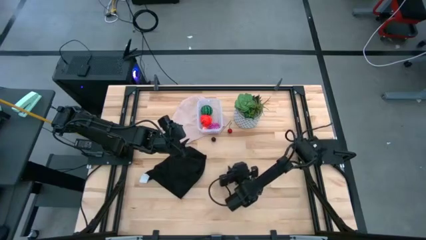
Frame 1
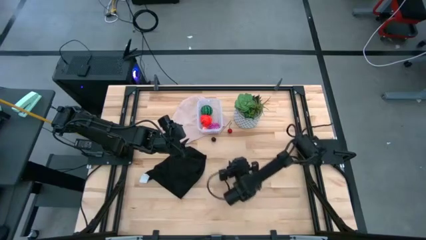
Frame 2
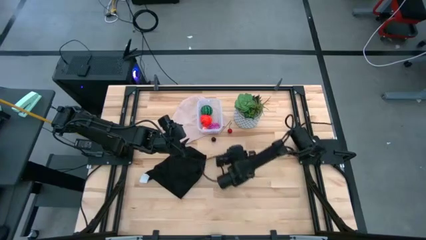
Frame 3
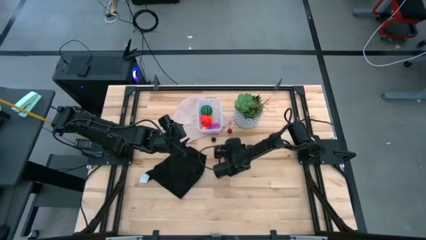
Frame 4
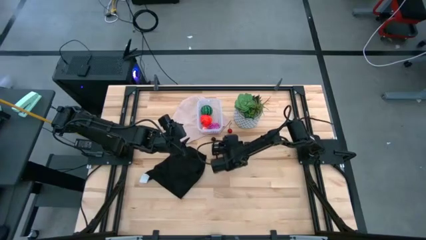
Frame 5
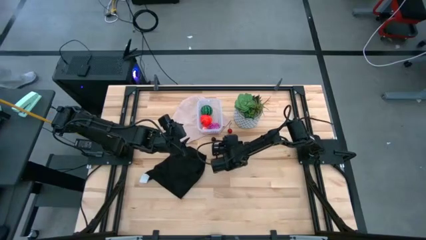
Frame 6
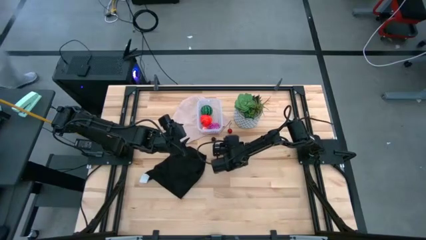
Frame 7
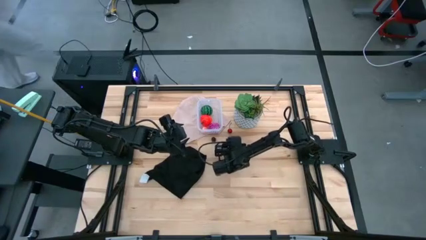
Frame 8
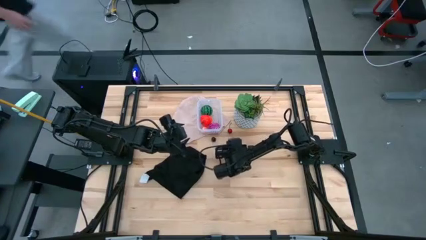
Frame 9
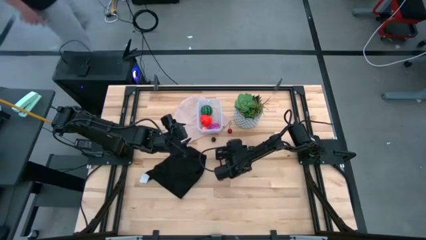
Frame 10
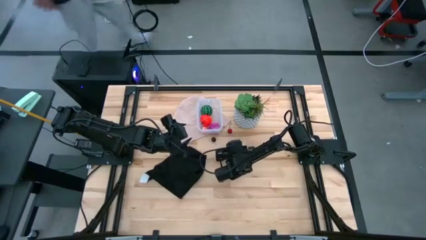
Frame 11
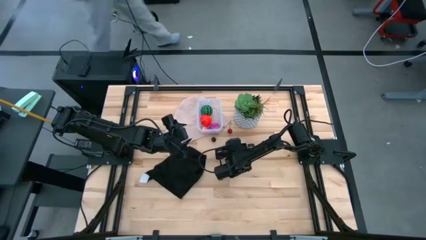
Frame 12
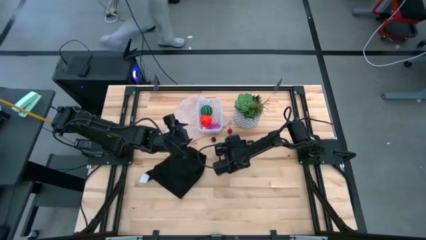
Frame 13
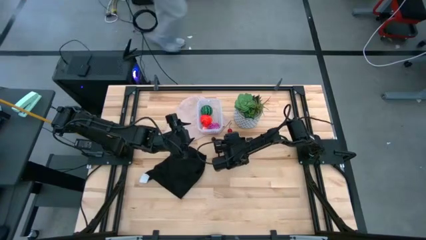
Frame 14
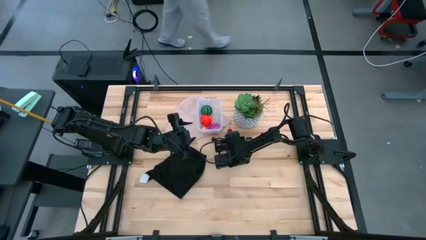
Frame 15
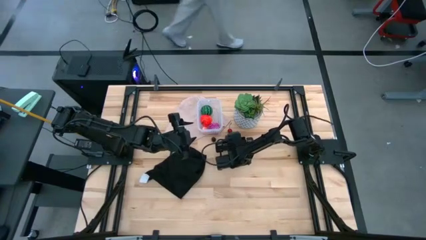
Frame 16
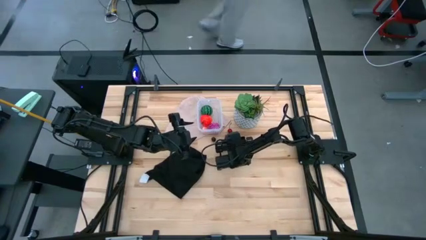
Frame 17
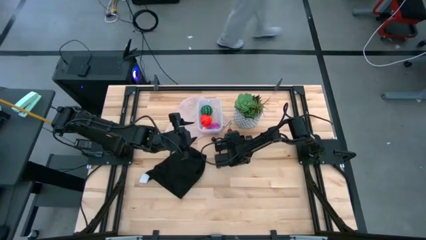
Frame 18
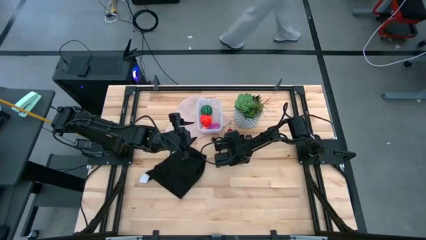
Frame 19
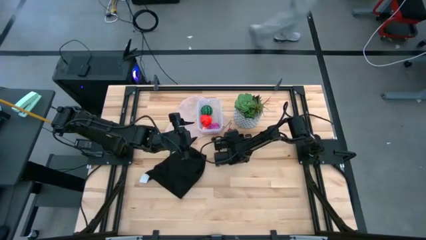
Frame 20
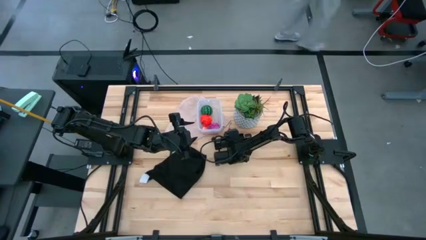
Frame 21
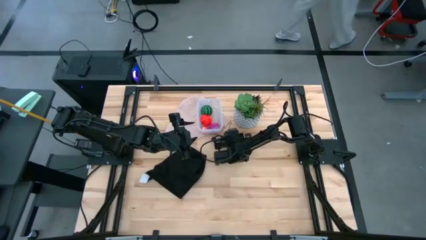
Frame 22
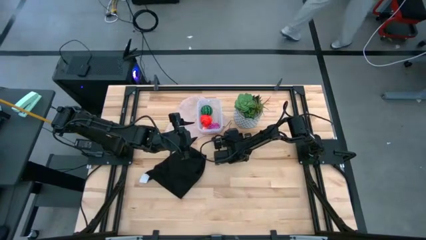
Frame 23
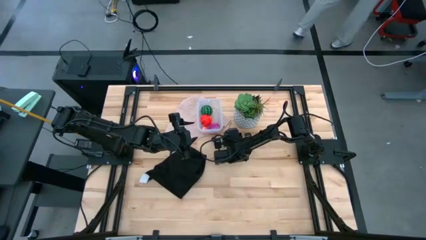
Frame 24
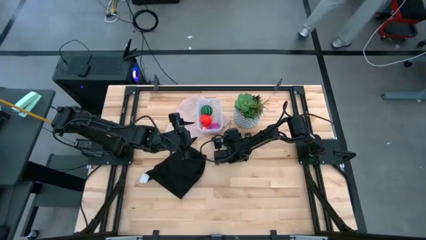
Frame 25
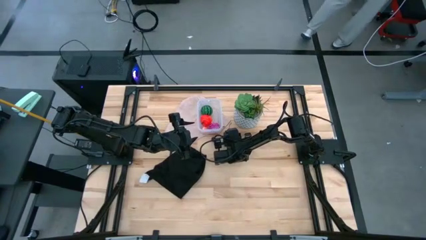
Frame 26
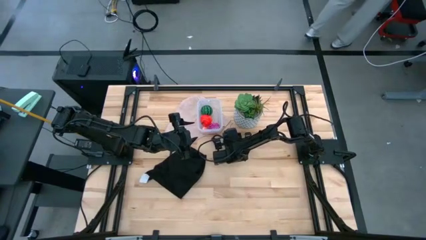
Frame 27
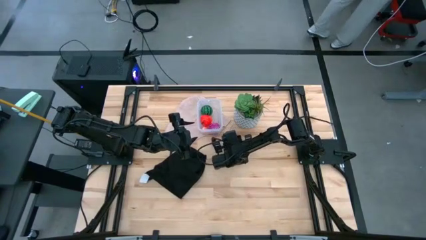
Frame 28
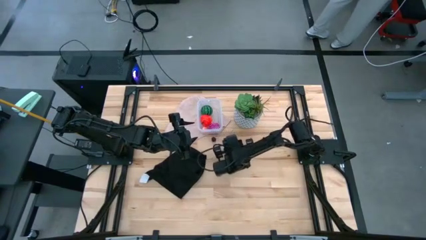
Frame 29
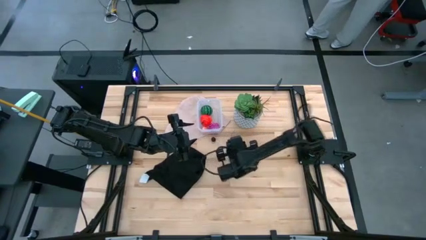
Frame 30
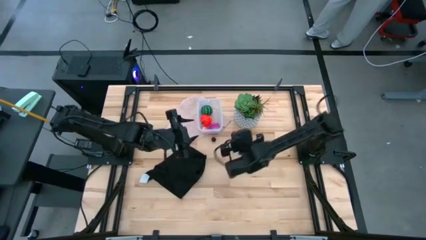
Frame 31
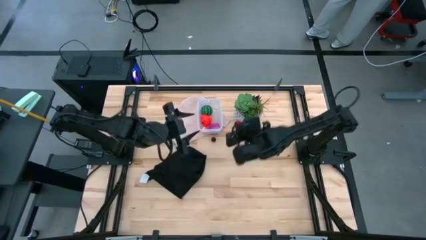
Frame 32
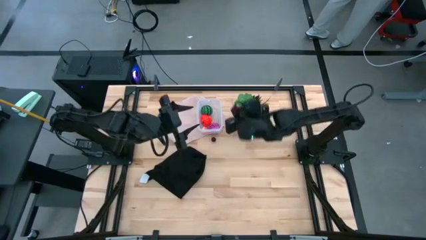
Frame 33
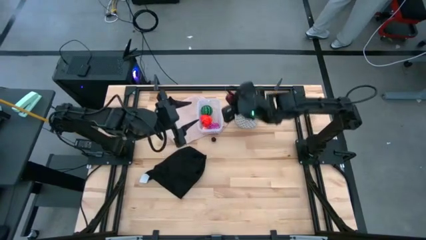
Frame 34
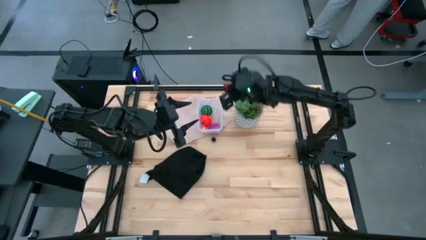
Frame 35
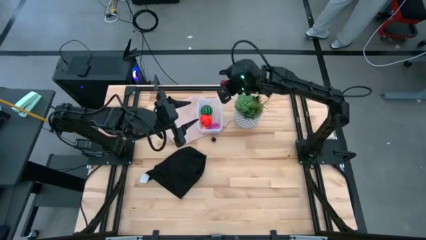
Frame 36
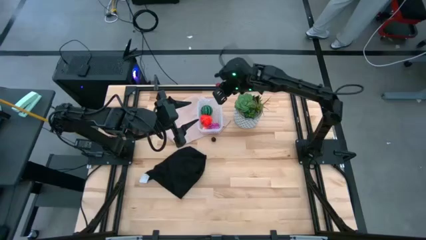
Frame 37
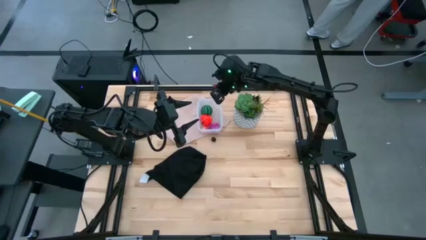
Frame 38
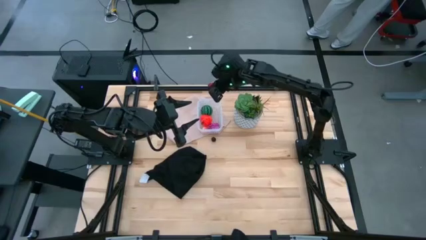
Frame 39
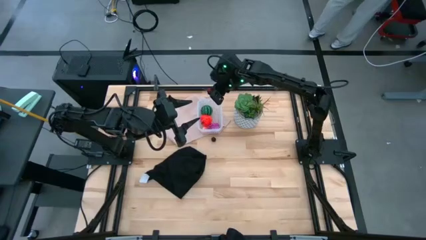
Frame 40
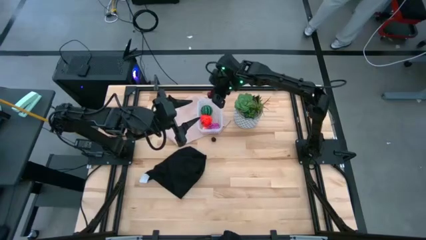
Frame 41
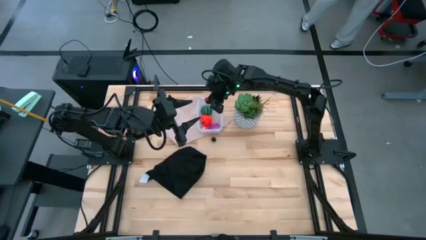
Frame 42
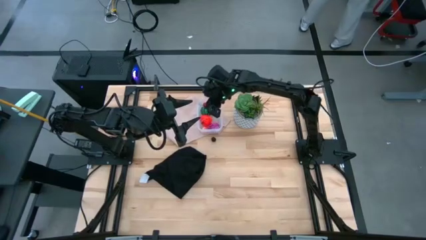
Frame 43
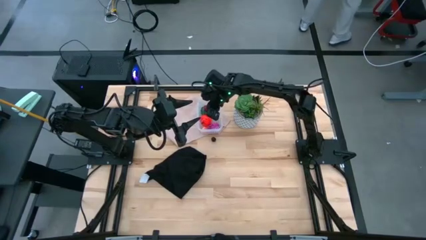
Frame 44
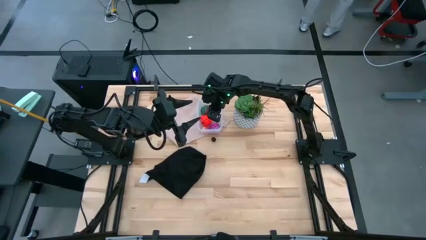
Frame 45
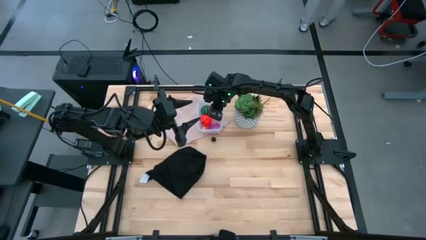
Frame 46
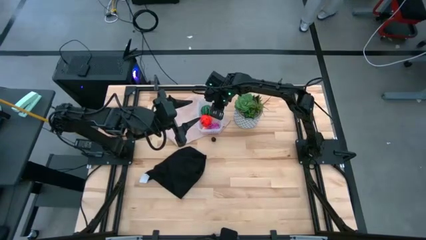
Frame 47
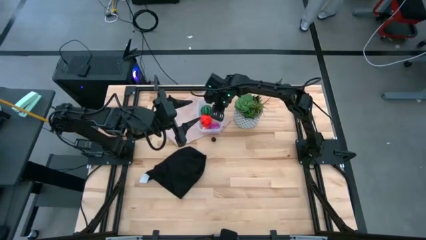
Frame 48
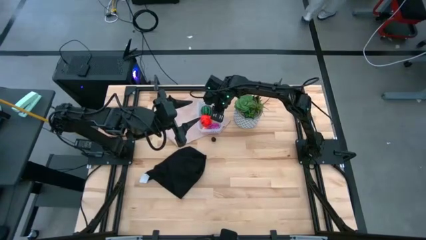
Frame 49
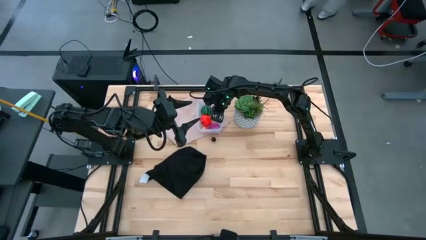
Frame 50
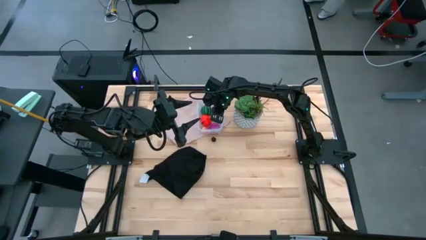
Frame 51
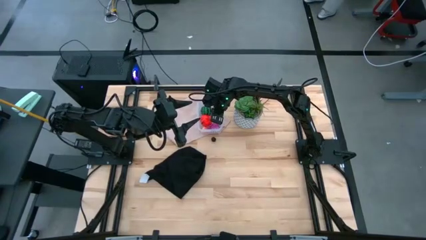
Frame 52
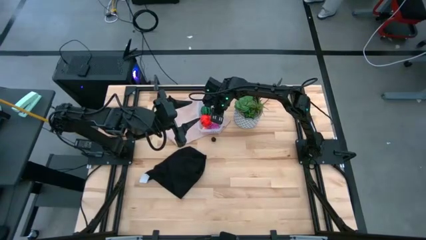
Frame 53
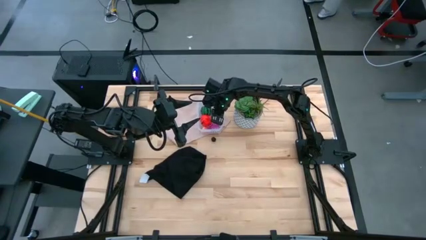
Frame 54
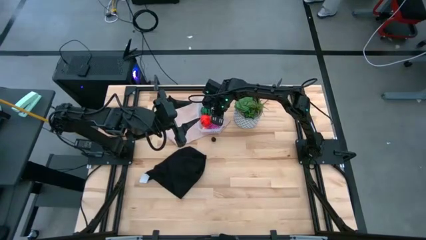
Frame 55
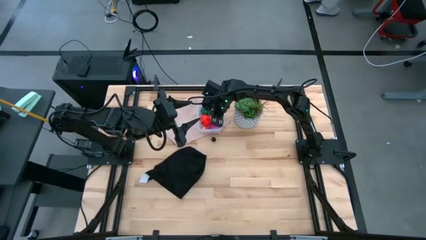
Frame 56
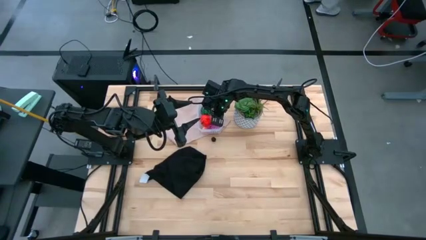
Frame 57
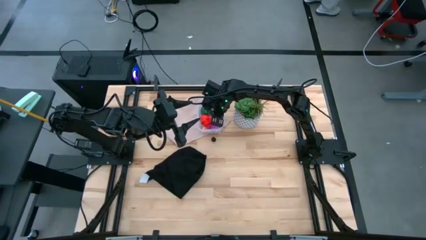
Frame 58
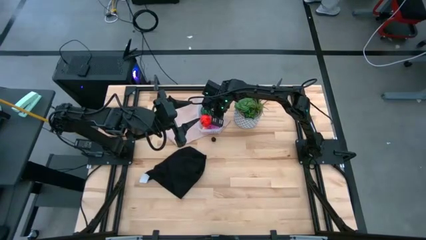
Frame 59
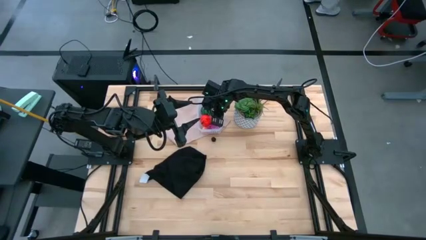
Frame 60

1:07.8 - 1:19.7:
Task: Pick and placing Produce into tupperware
Put the cherry into the transparent bin

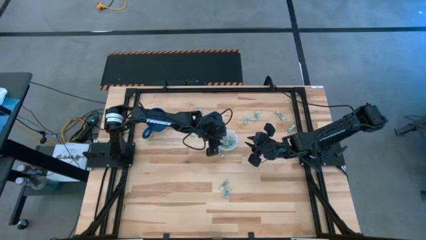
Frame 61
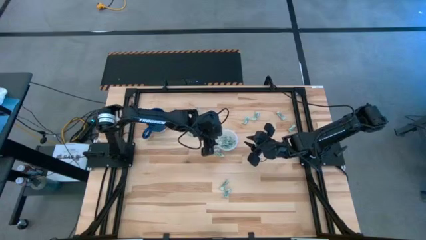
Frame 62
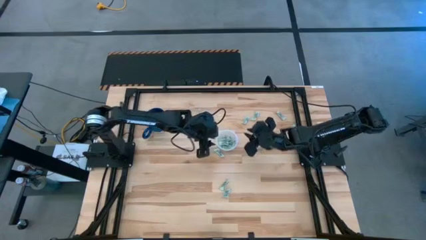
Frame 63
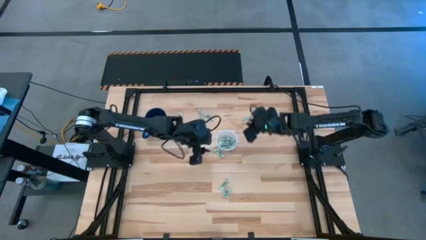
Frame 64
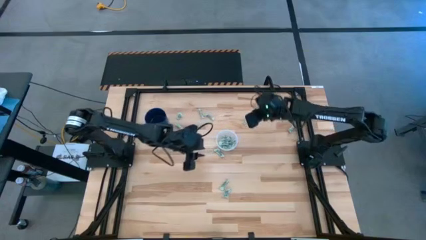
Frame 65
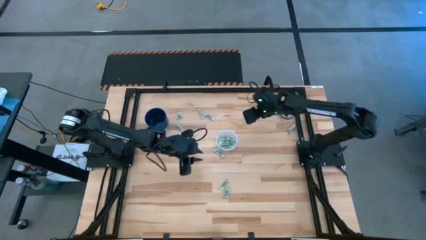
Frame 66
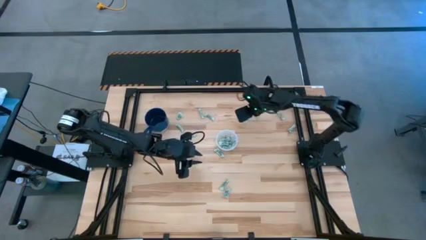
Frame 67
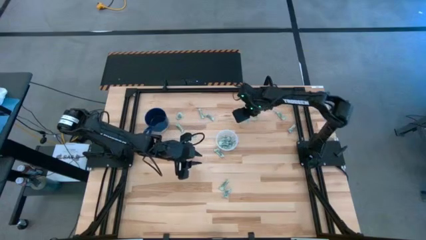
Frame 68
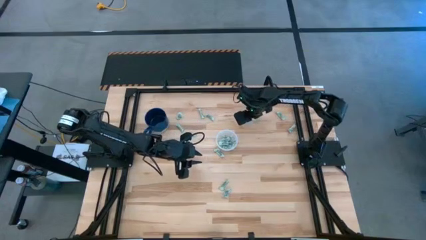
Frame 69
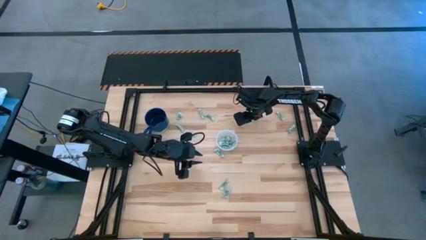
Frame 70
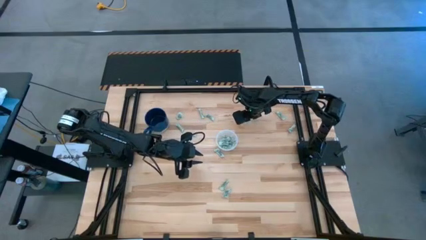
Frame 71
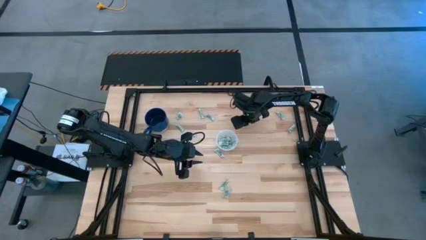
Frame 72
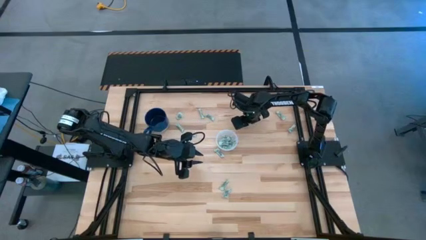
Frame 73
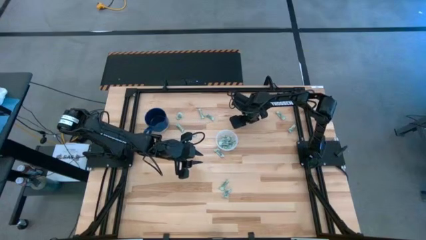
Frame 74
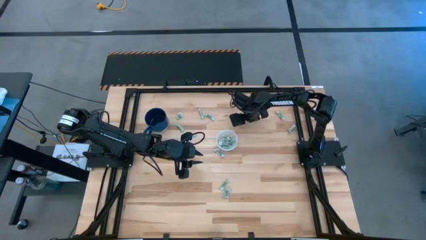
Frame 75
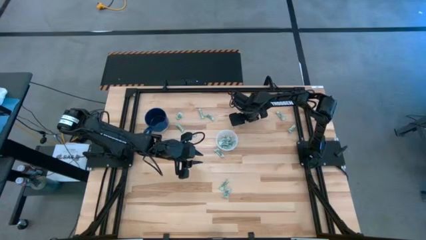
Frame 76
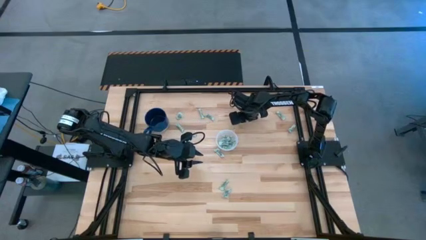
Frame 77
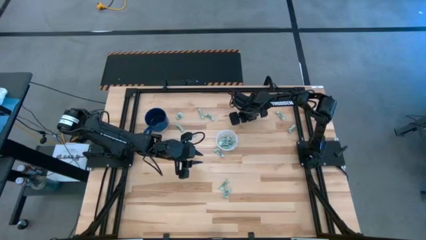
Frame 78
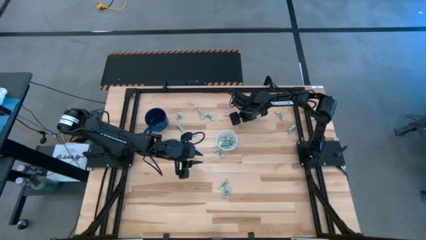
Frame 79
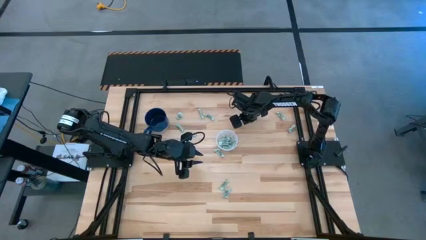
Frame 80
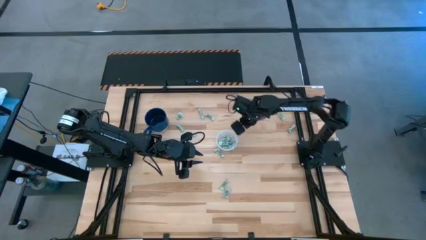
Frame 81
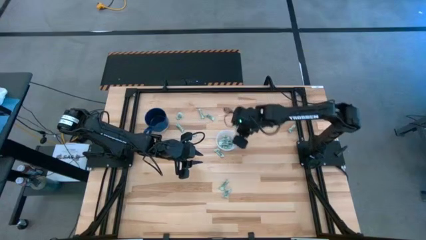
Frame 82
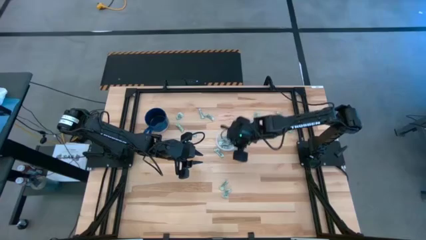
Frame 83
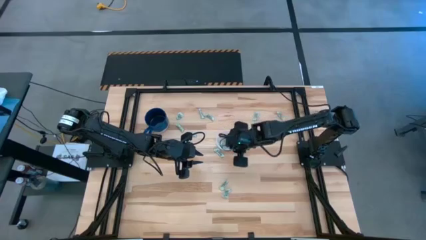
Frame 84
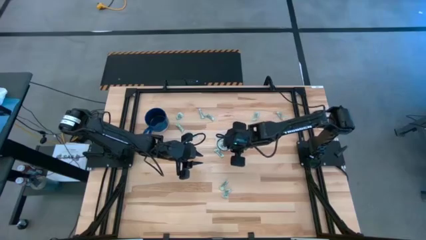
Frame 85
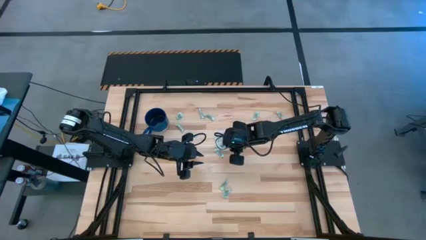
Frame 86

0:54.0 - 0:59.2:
Task: Pick and place items into bin
Put the gray stevia packet into the transparent bin
